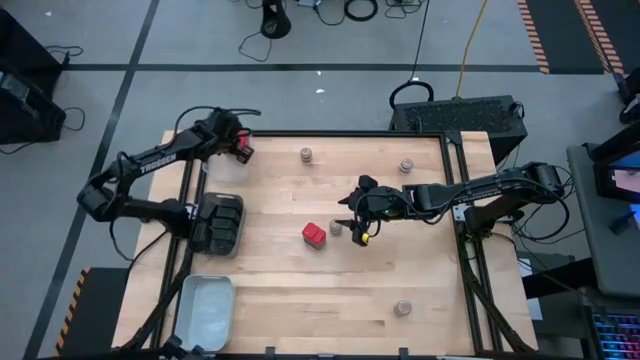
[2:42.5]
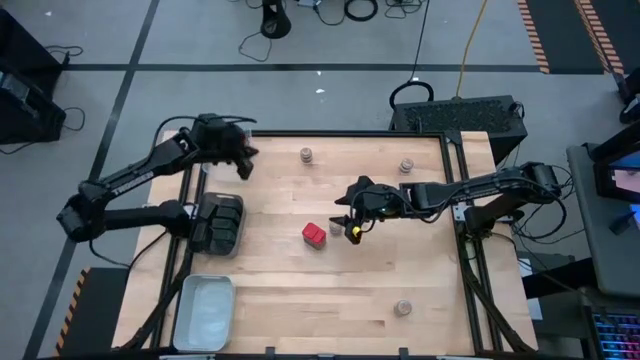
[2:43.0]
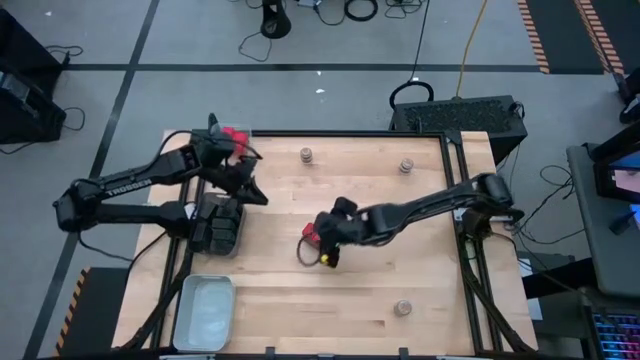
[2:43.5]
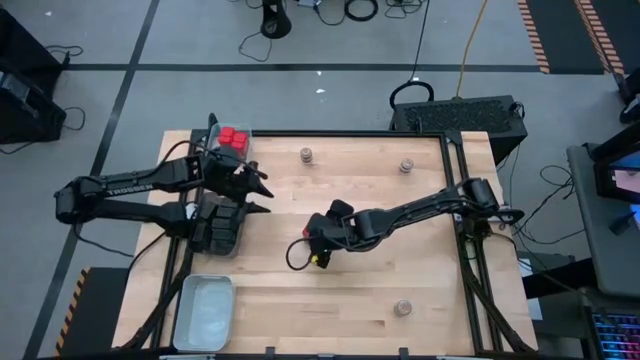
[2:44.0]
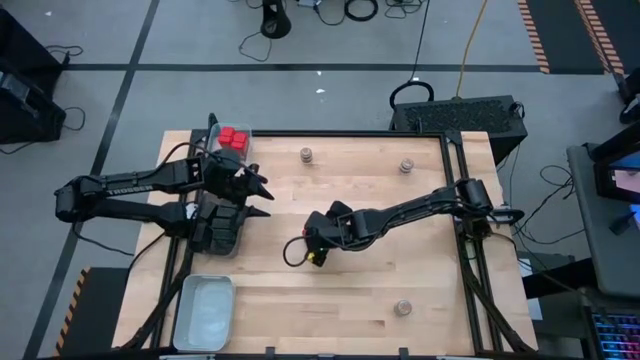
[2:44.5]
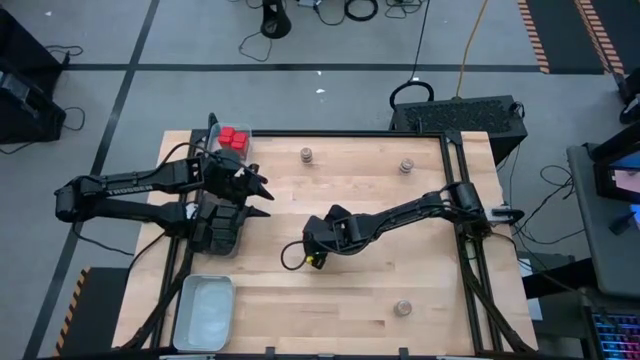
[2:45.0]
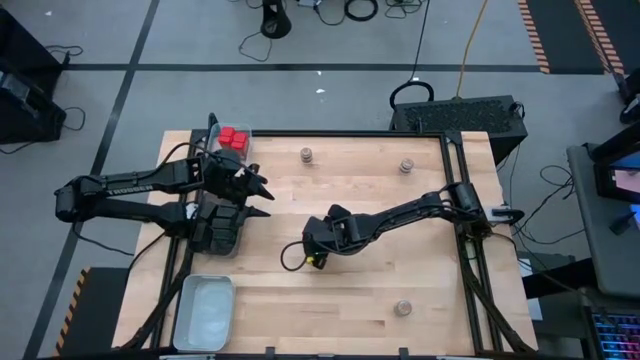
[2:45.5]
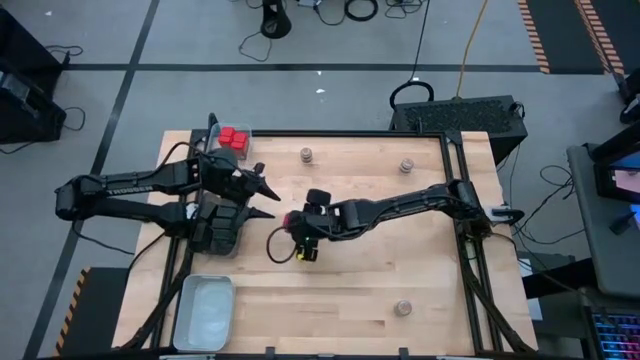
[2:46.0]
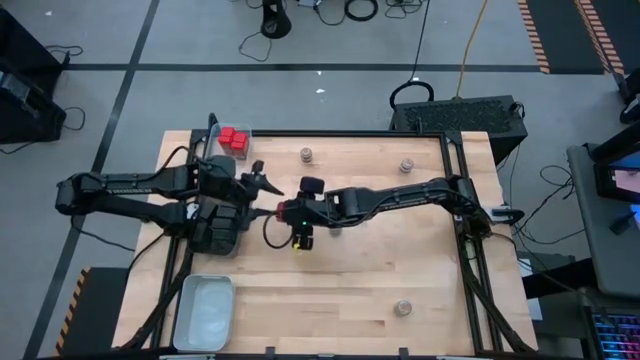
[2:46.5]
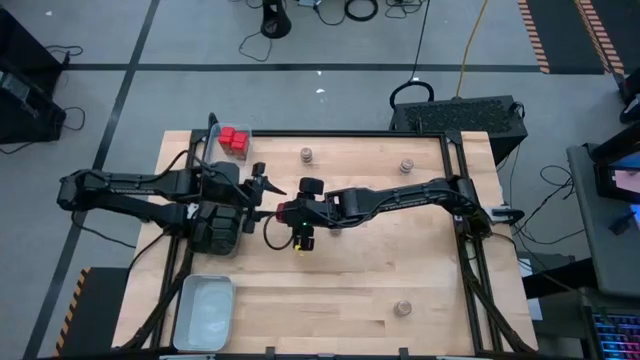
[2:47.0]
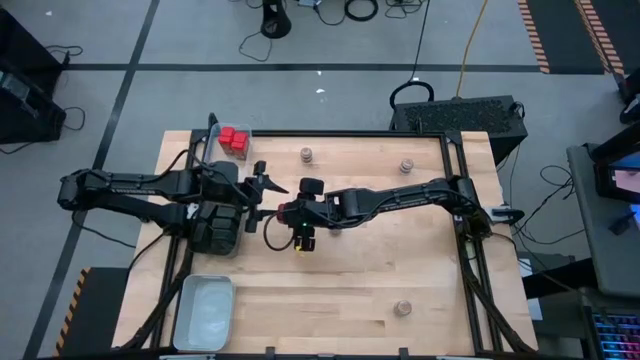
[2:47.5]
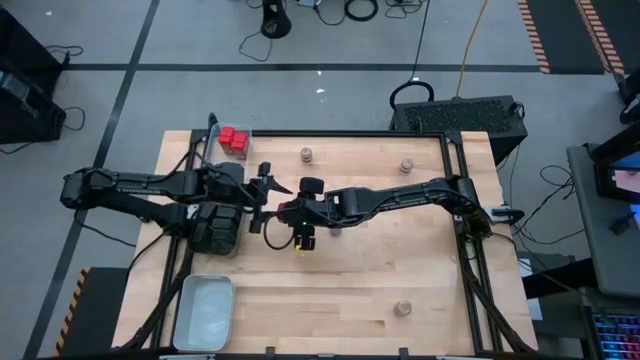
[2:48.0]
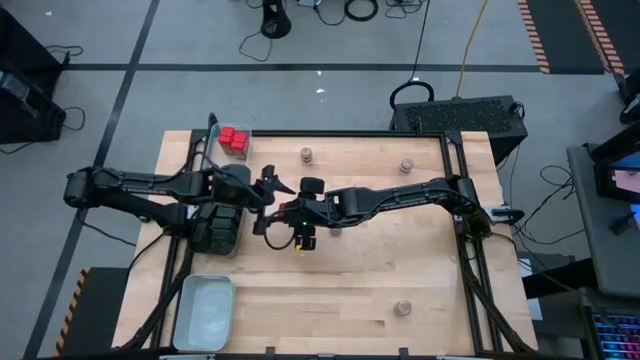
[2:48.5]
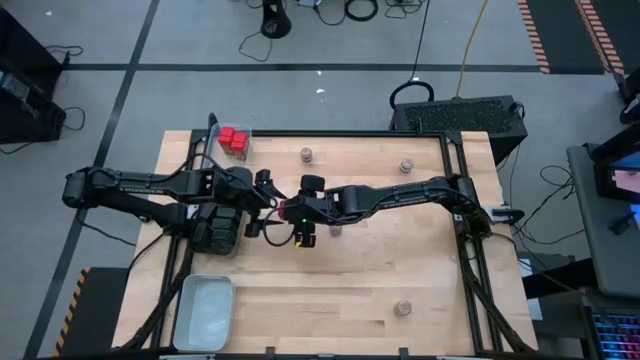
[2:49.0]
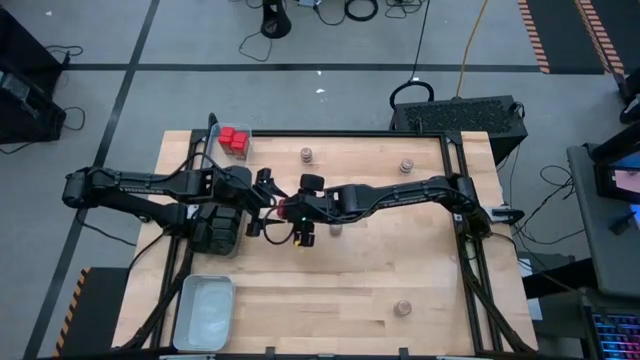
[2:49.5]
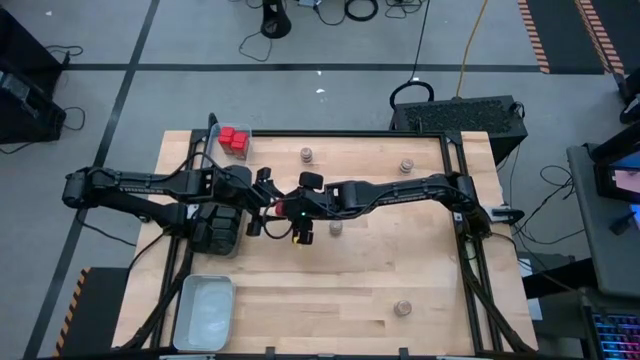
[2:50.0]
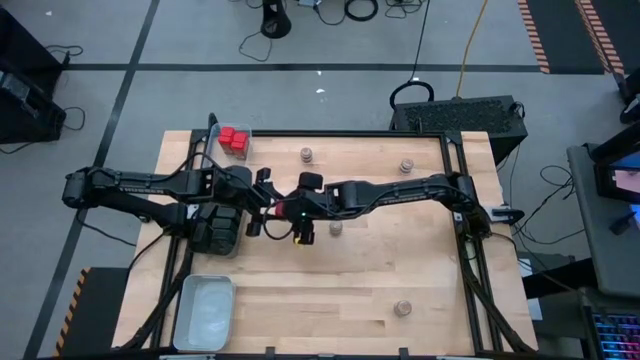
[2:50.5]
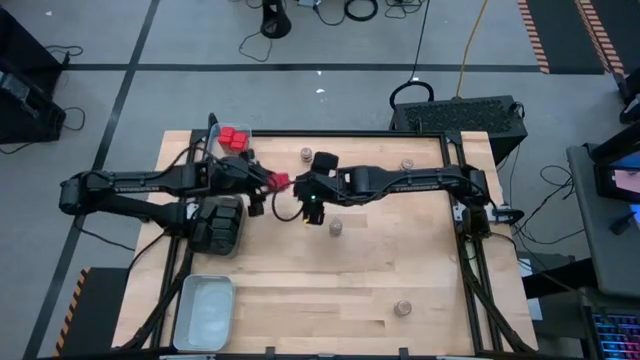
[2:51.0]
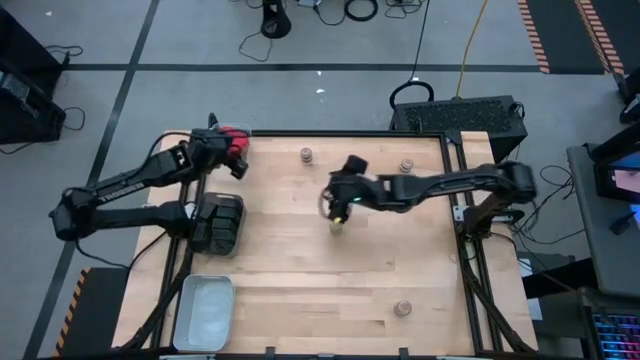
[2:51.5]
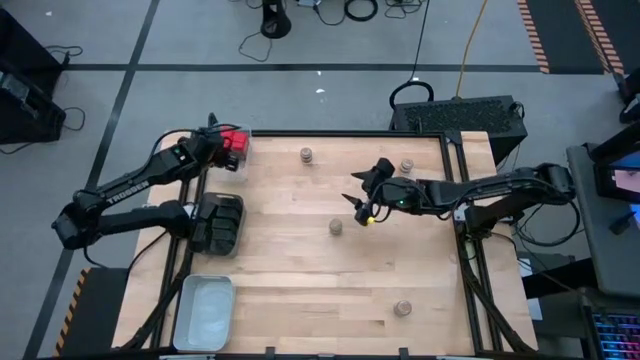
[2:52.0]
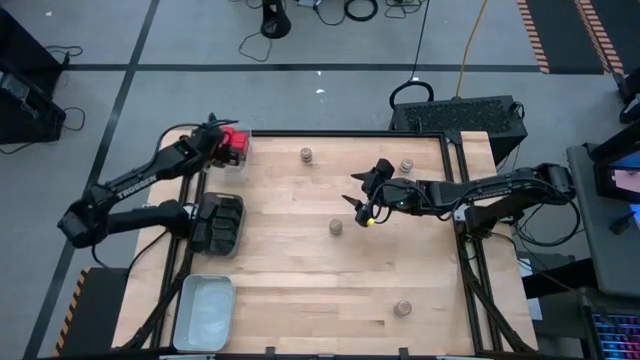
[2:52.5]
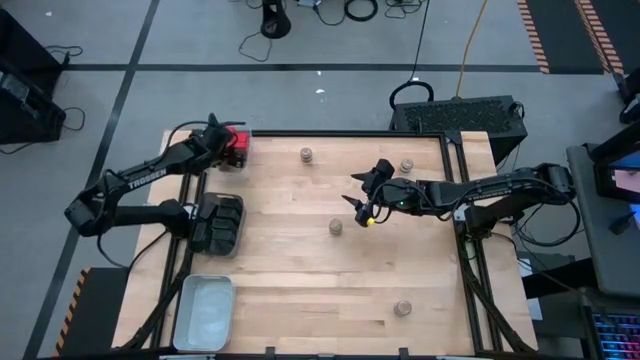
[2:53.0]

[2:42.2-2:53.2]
Task: Sort spices by type
Put the red seasoning can into the transparent bin

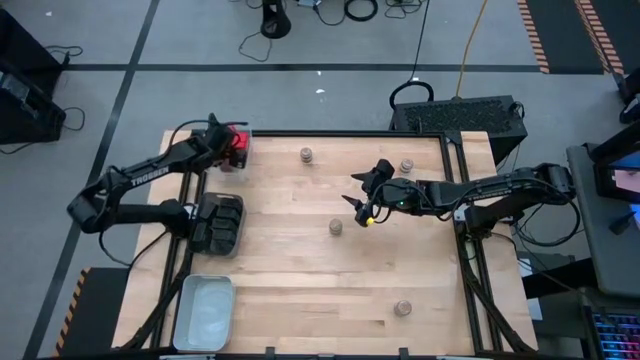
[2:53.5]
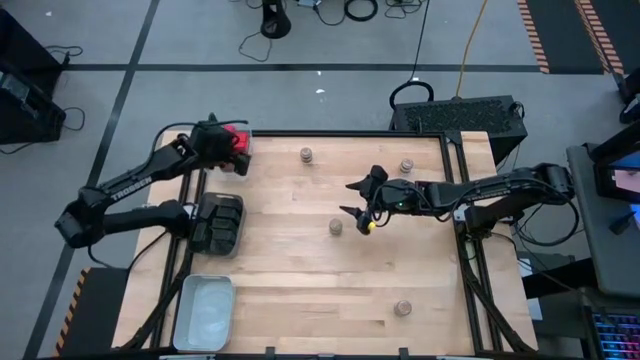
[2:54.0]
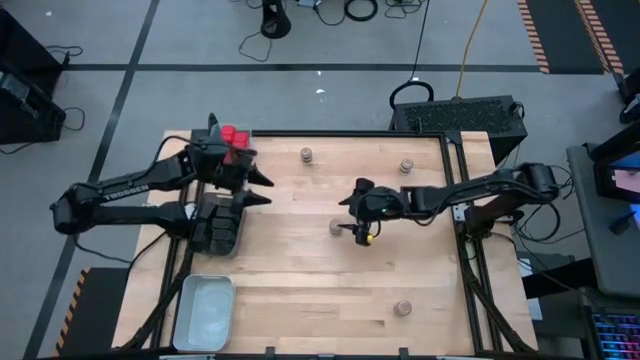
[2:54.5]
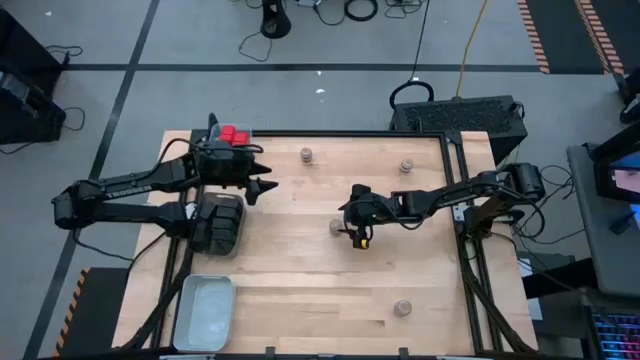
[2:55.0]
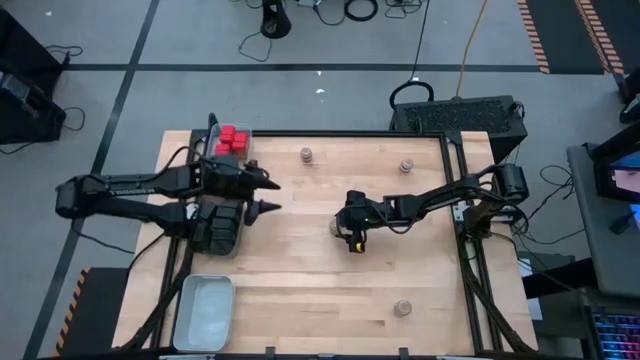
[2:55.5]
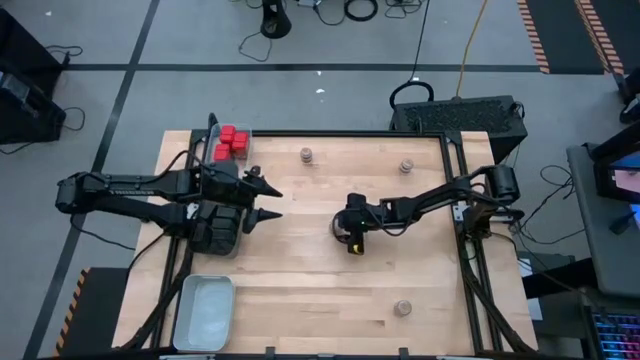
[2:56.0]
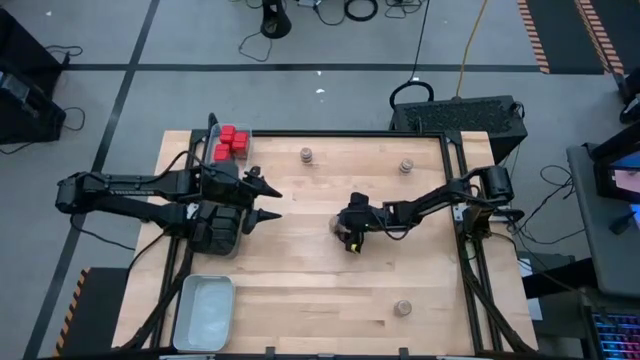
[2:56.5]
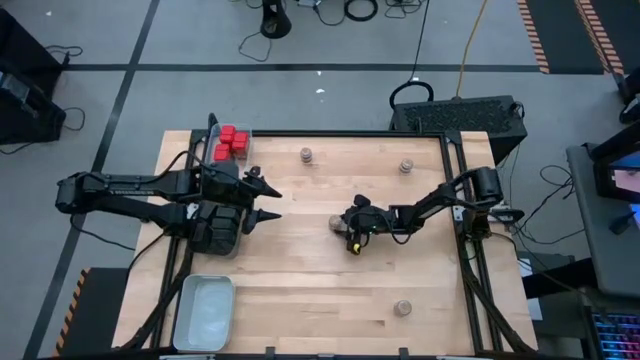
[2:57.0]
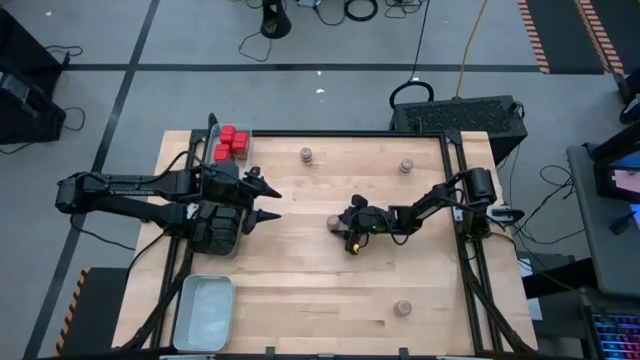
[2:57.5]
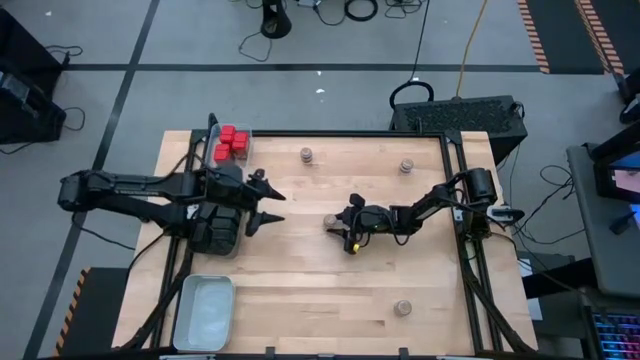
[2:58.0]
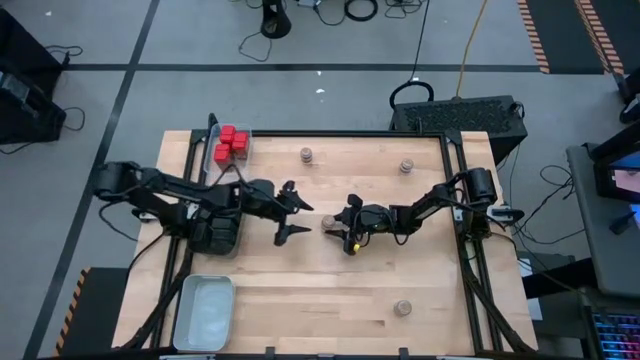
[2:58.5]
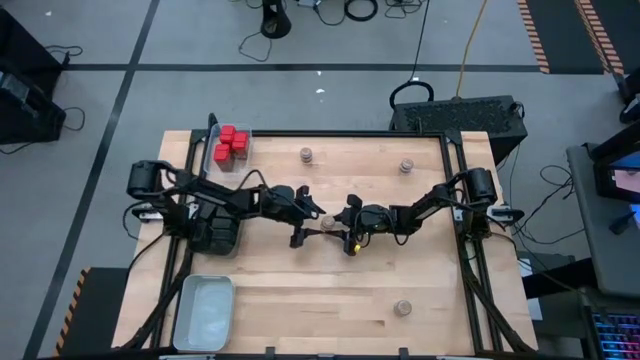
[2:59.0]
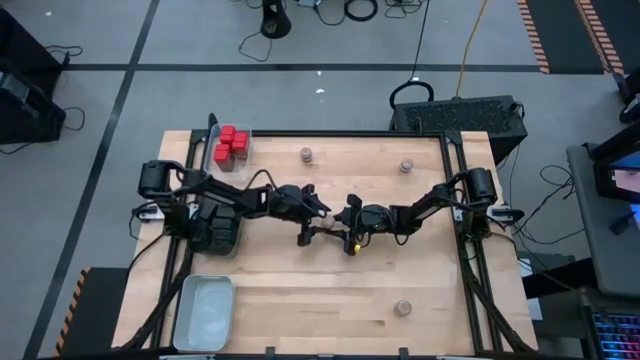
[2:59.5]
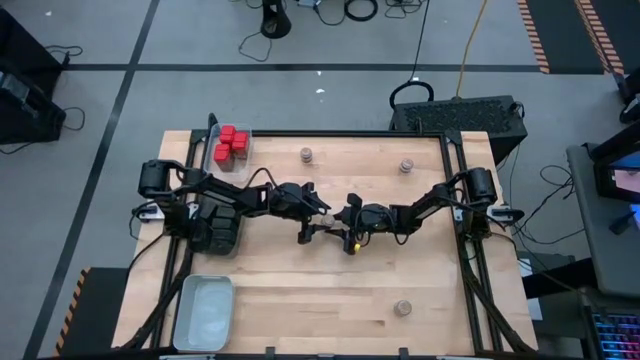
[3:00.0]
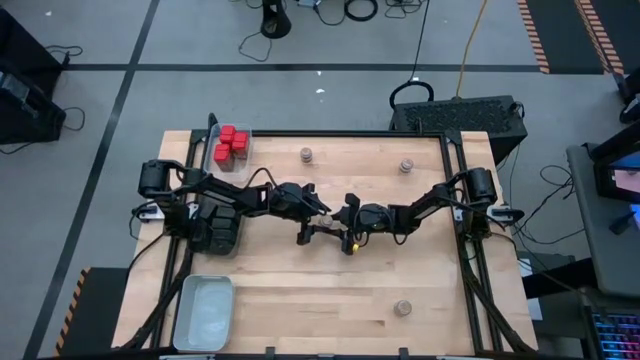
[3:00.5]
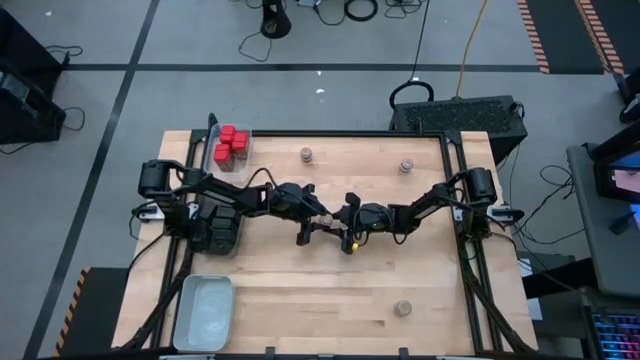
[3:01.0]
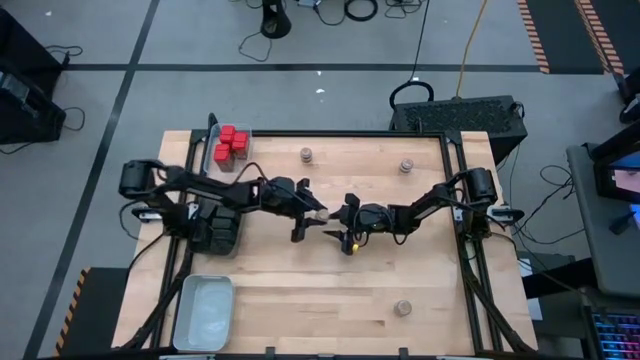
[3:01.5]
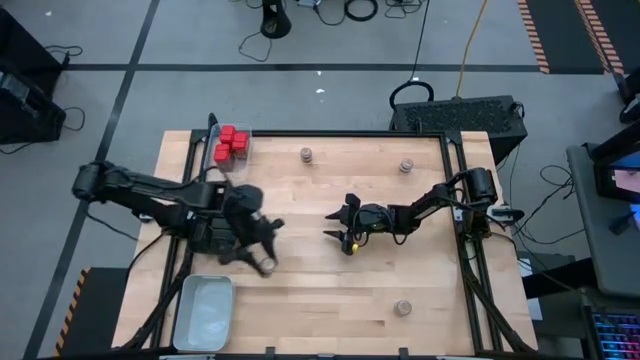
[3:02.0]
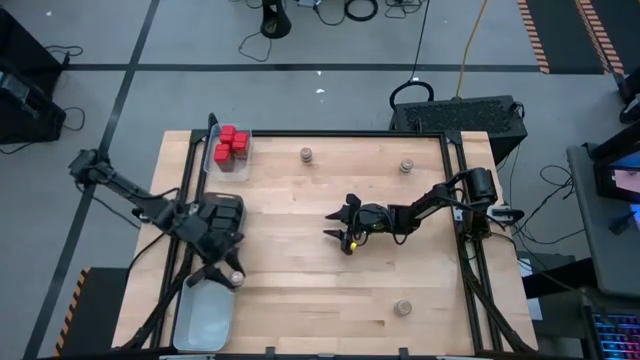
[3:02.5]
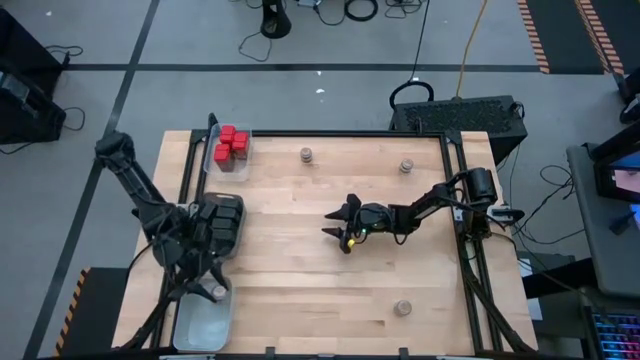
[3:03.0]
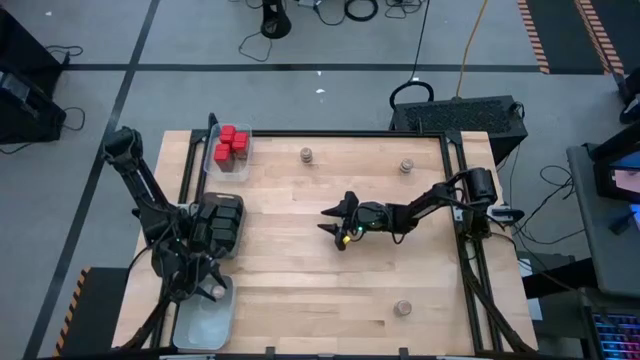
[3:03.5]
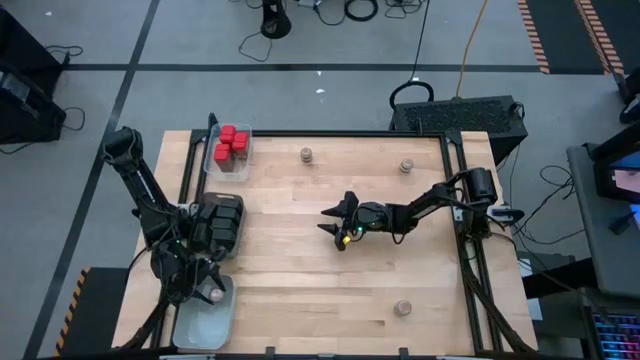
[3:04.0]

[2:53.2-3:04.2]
Put the brown seasoning bottle into the gray bin

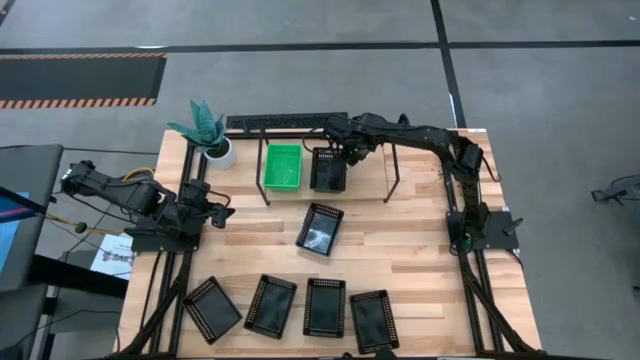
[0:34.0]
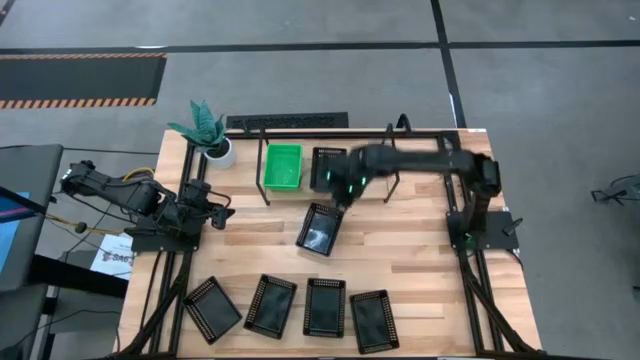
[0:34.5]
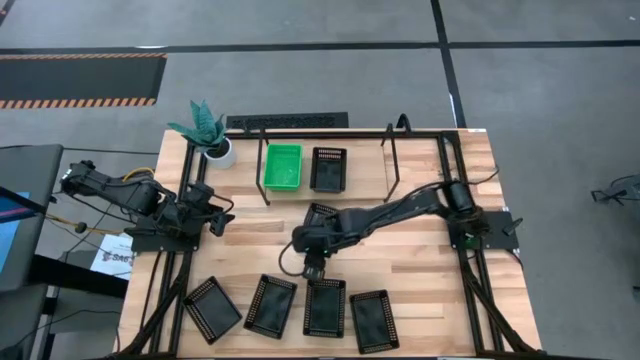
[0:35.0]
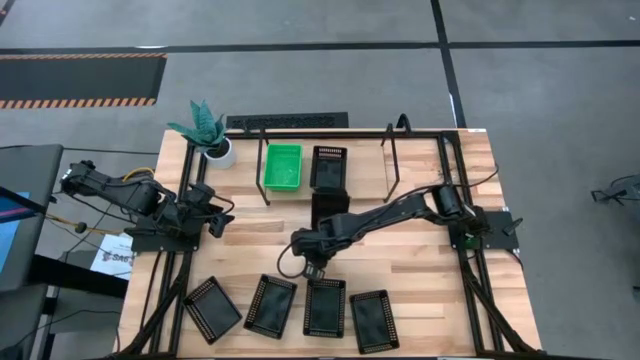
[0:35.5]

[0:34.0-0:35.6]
Task: Stack baskets on shelf by color
Stack the black bin on top of the black bin on the shelf
